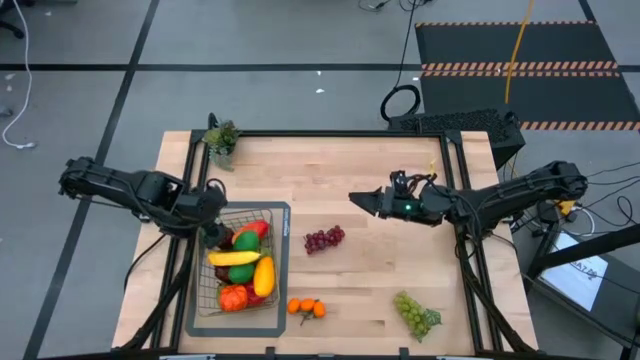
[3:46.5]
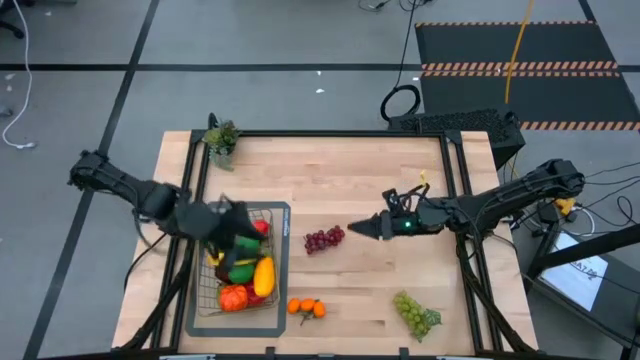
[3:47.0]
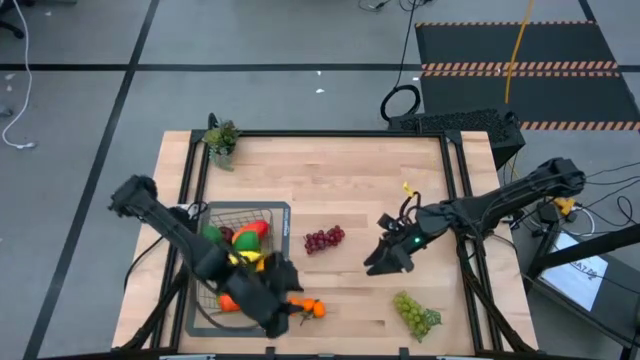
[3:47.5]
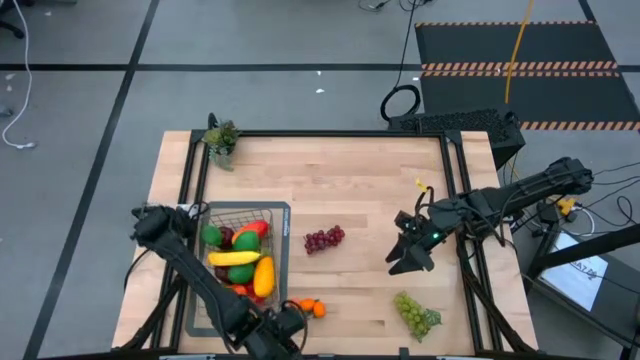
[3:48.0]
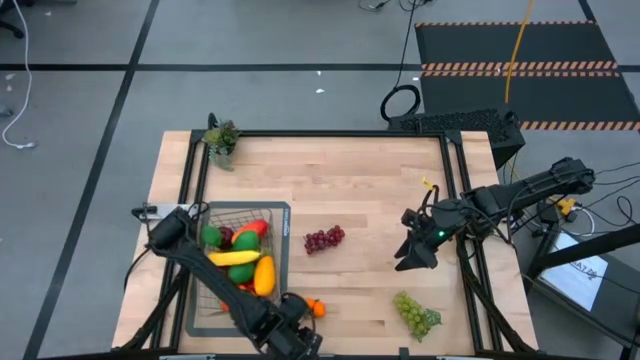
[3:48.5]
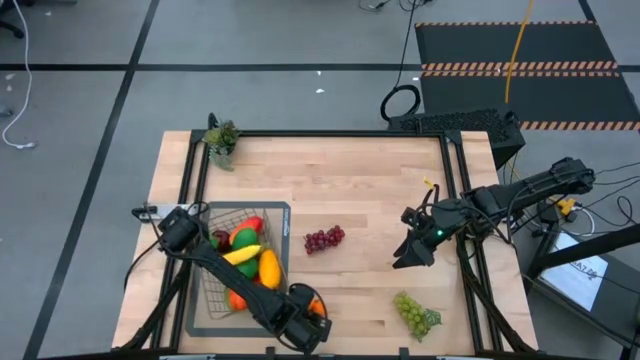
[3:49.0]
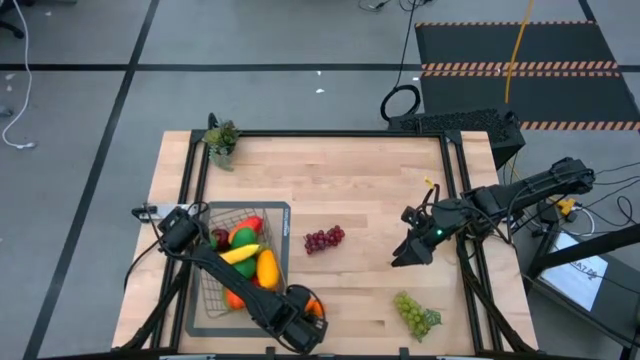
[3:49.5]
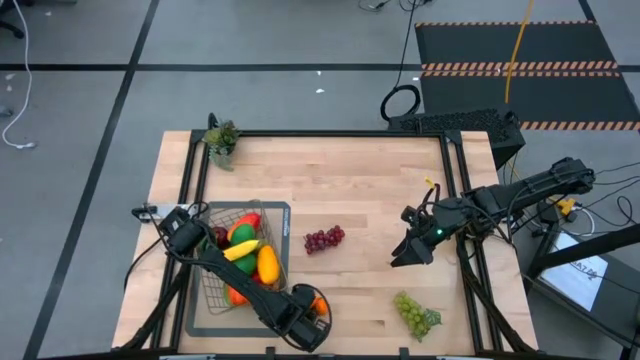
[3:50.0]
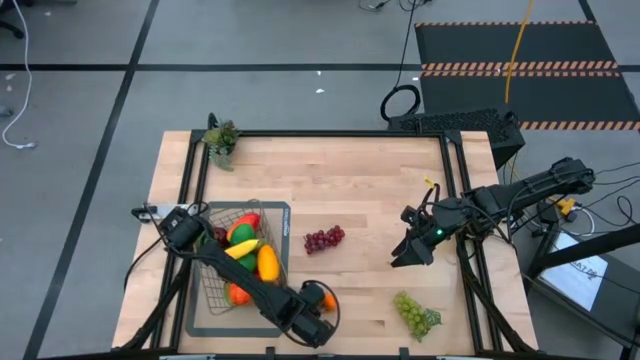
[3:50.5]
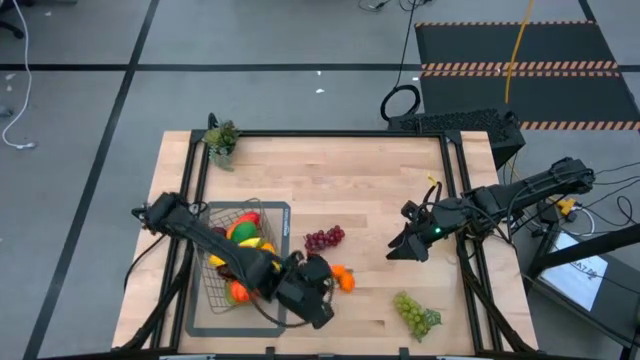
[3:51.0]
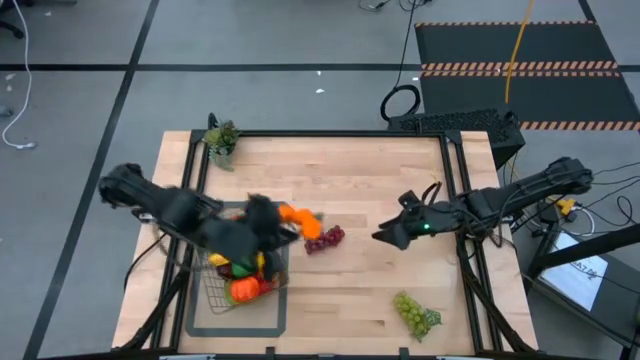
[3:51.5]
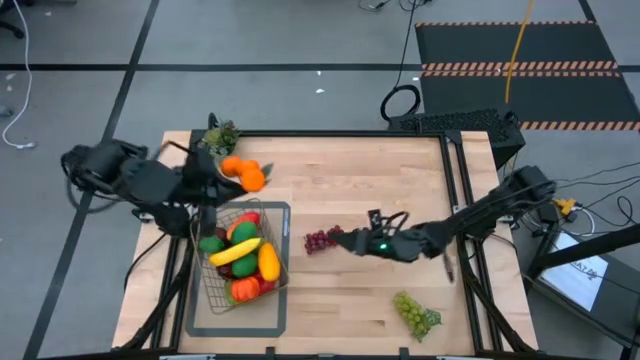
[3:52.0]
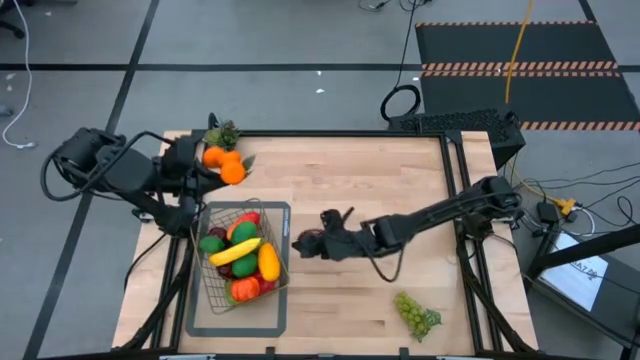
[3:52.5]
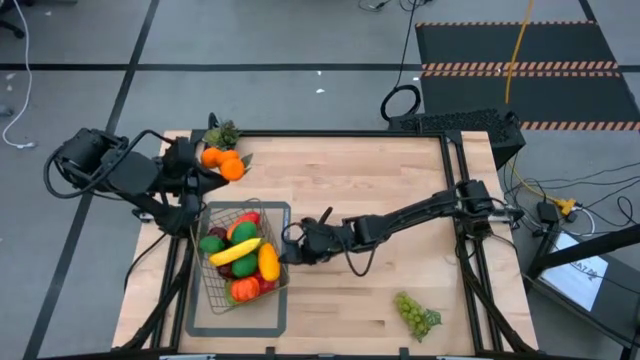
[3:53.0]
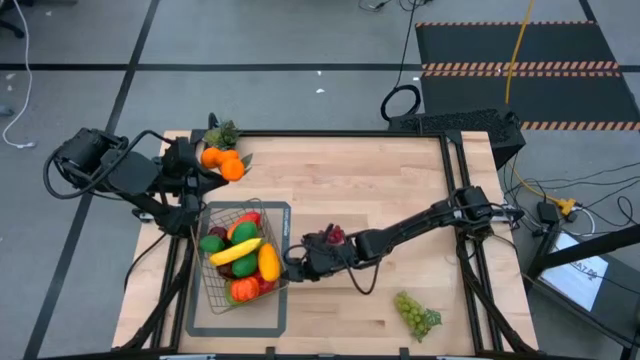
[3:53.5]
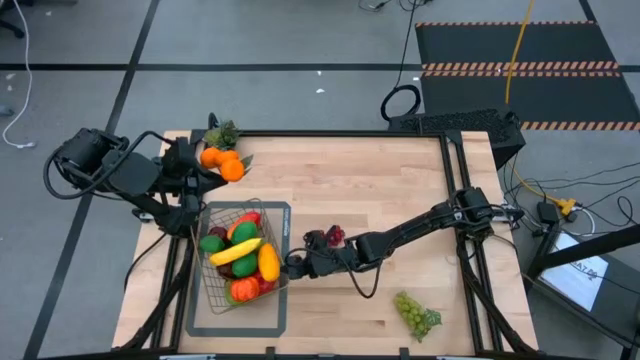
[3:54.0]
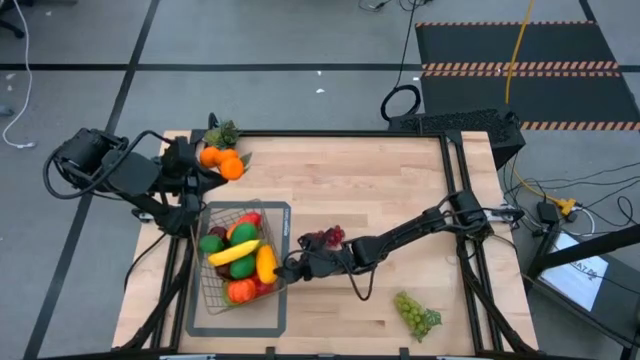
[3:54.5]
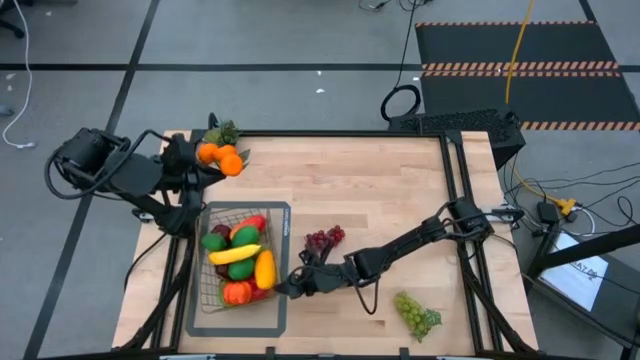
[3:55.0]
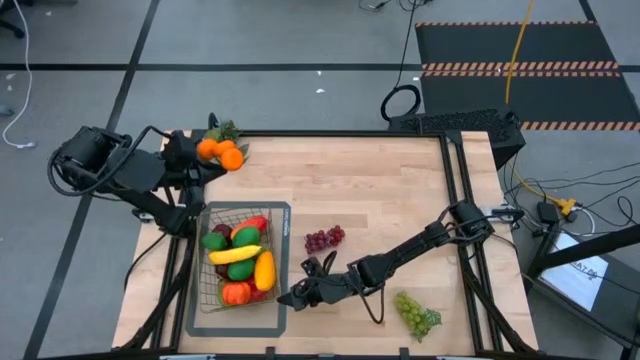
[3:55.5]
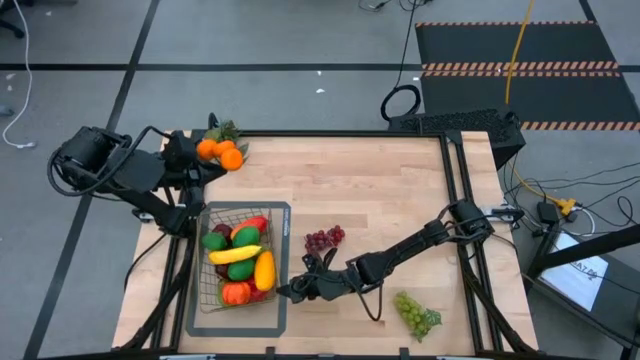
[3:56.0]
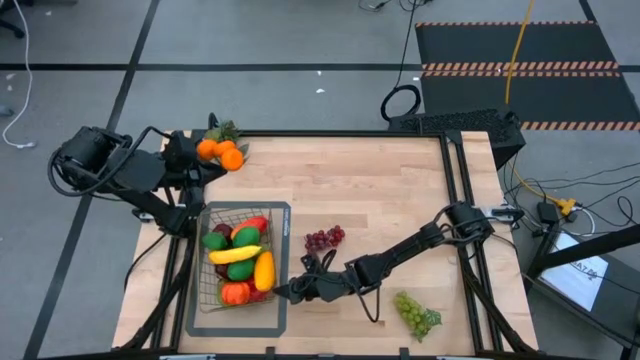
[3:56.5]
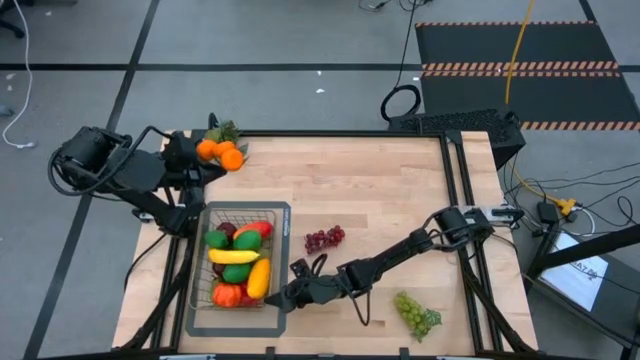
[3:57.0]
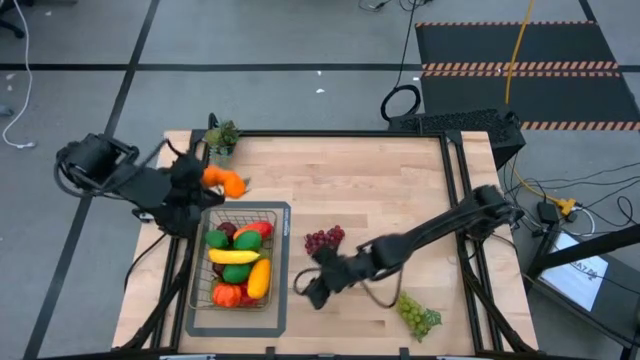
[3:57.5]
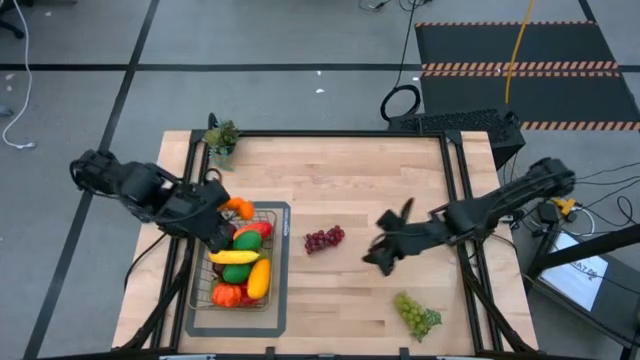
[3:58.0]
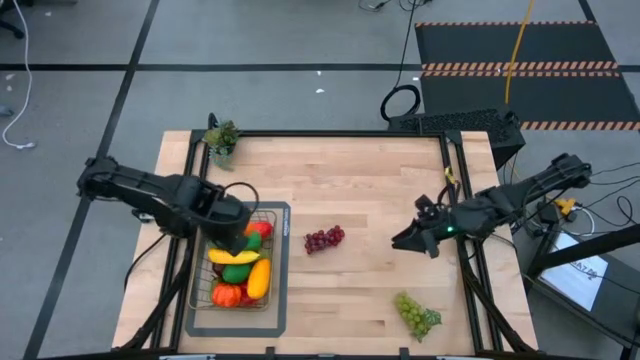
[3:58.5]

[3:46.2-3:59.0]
Task: Build produce basket
Put the tangerines into the wire basket

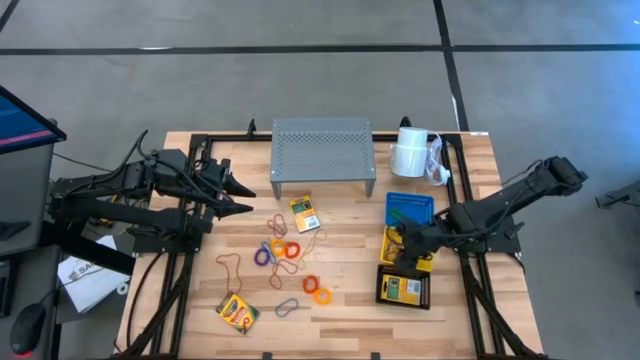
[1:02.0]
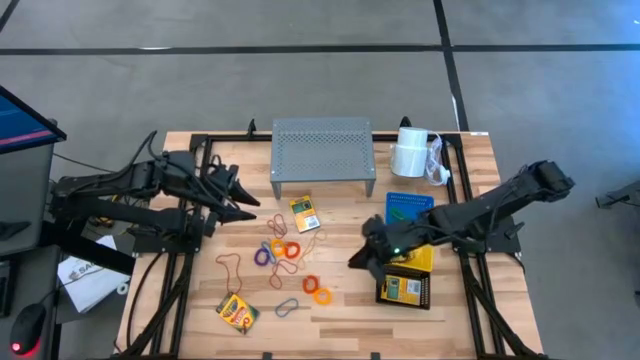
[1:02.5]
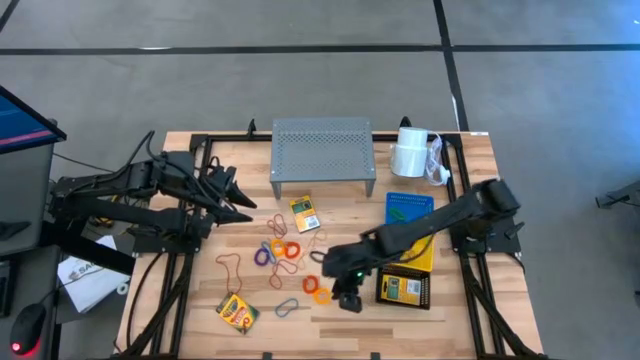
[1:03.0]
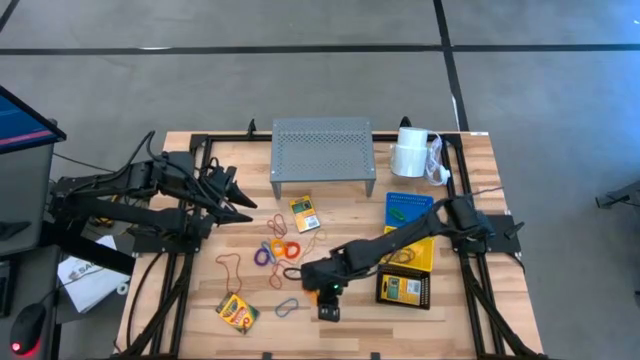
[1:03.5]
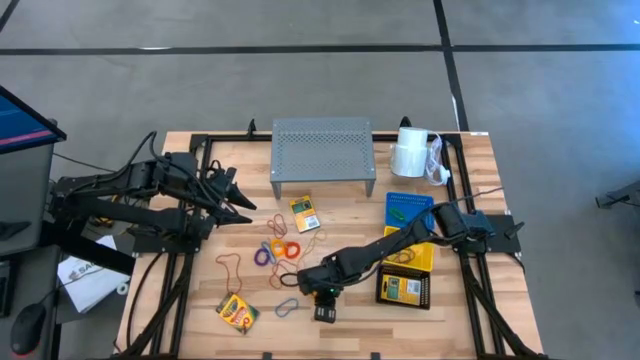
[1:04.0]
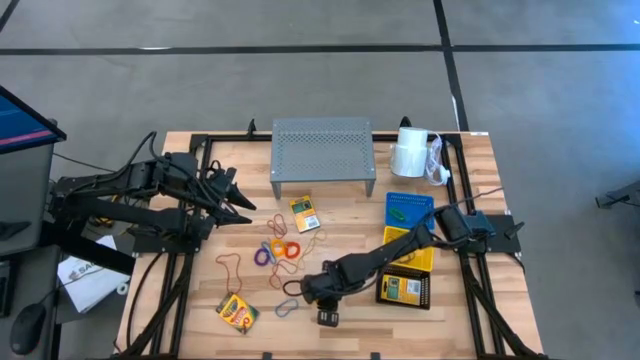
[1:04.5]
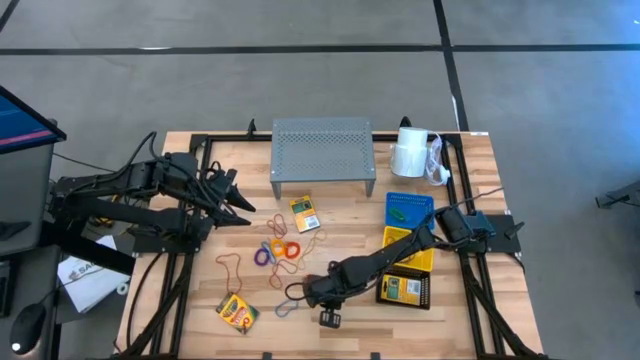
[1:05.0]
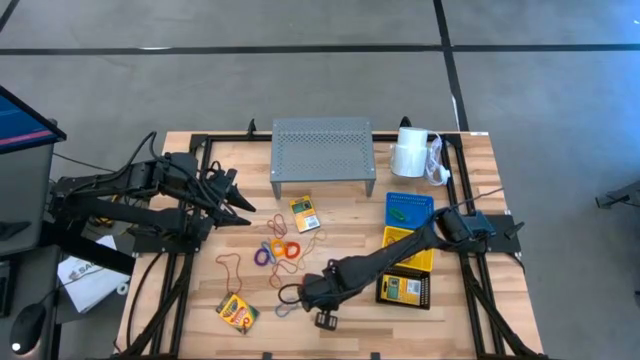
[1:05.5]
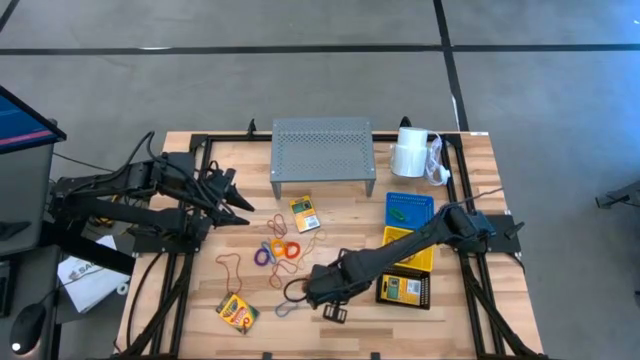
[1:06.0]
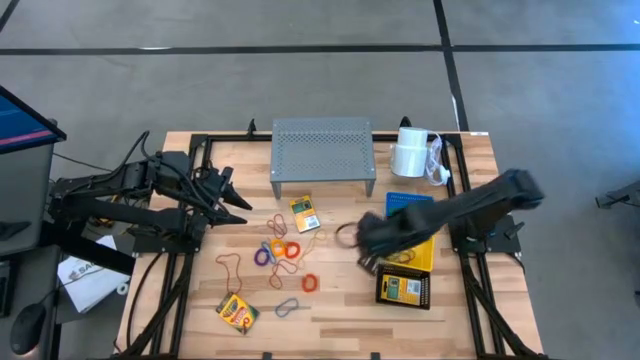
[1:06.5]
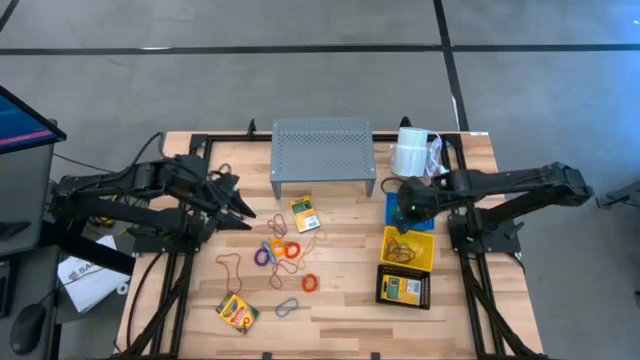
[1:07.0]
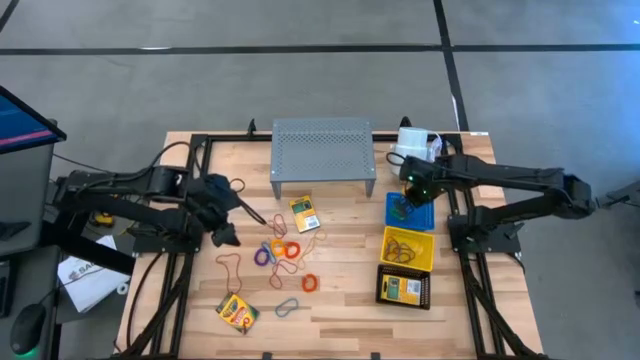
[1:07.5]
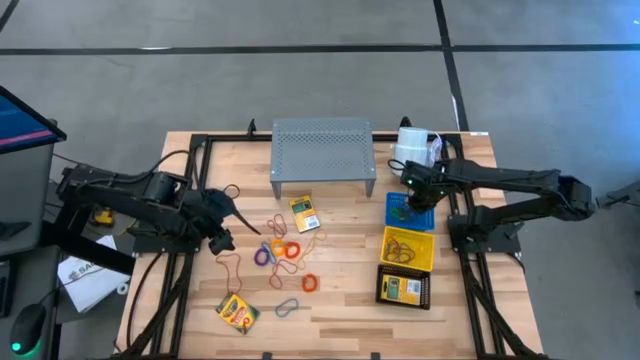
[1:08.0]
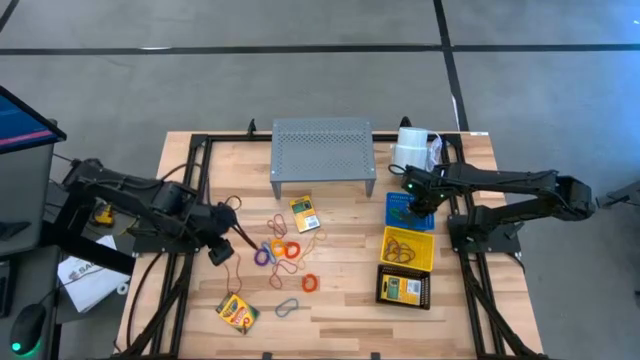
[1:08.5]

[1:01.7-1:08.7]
Task: Pick & Place Office Desk Supplies
Put the yellow spring keychain into the blue basket

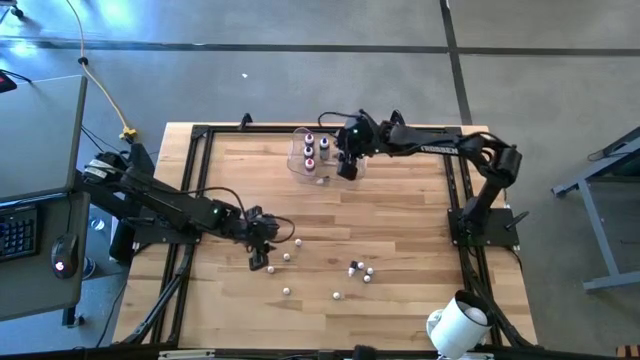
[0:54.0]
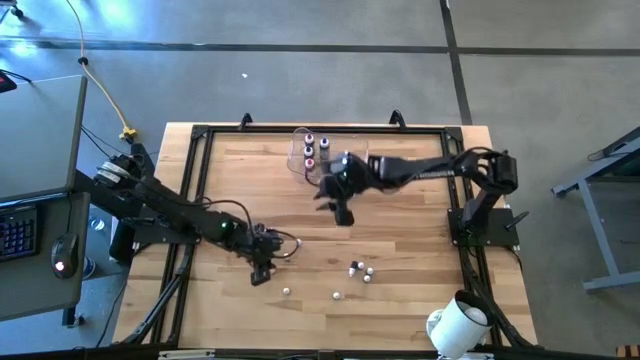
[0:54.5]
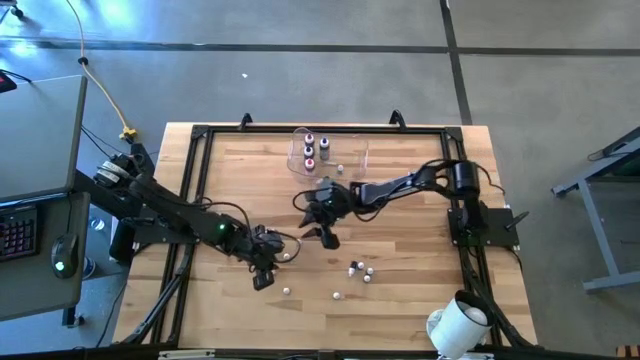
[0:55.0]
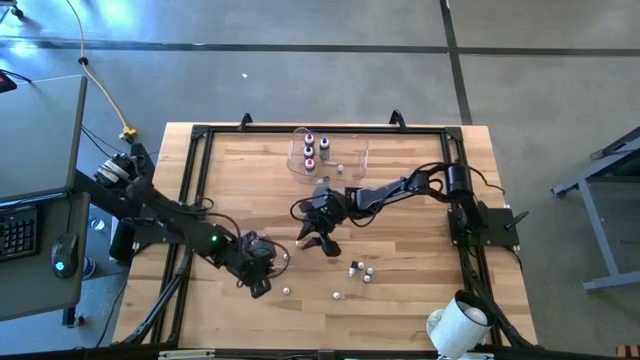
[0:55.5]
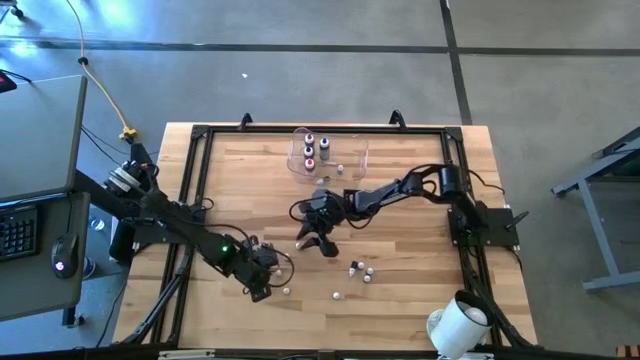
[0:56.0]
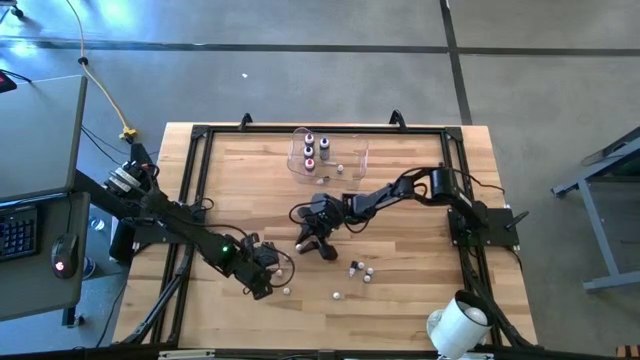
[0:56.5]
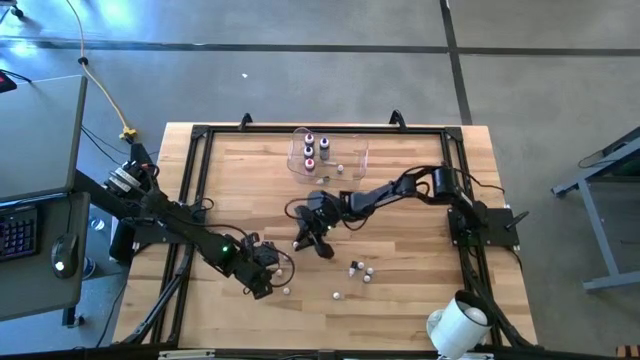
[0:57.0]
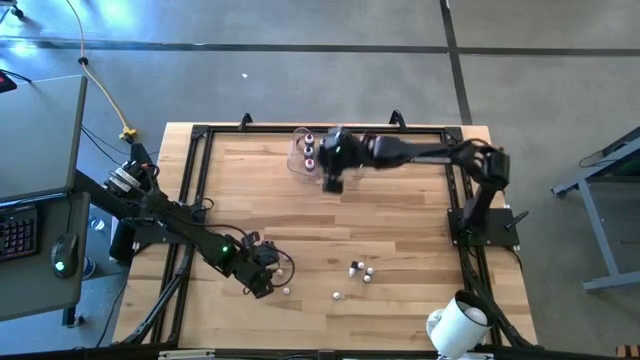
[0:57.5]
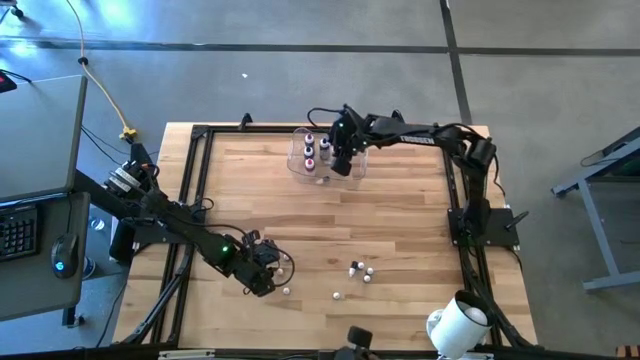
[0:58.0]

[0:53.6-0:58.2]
Task: Pick & Place food coloring
Put the red food coloring into the transparent bin
